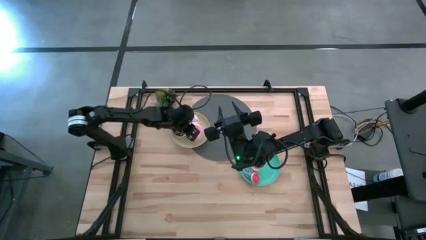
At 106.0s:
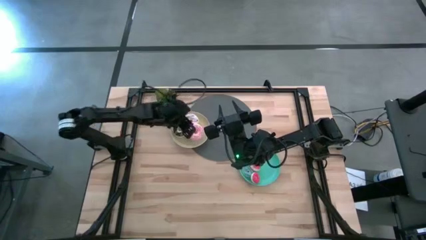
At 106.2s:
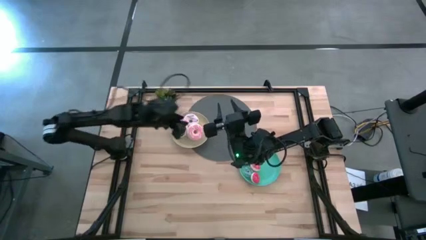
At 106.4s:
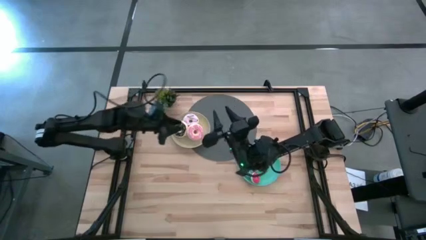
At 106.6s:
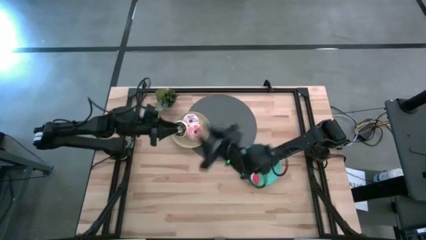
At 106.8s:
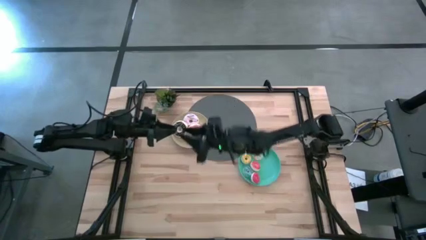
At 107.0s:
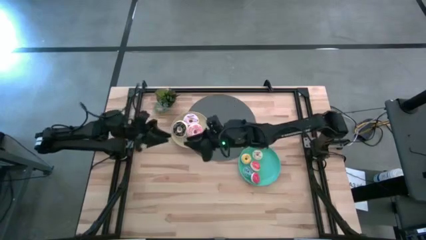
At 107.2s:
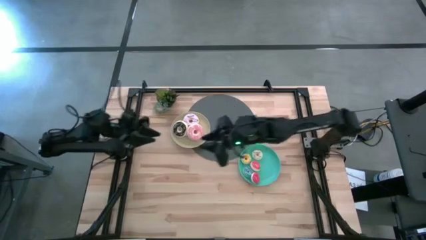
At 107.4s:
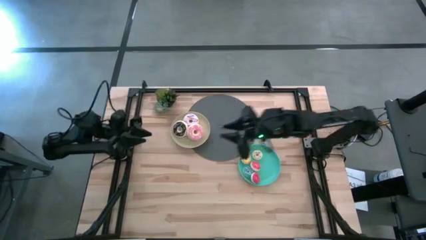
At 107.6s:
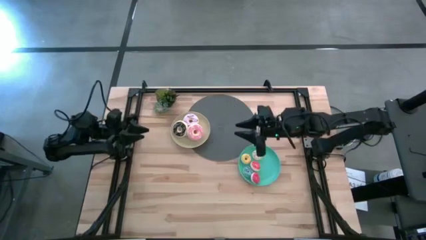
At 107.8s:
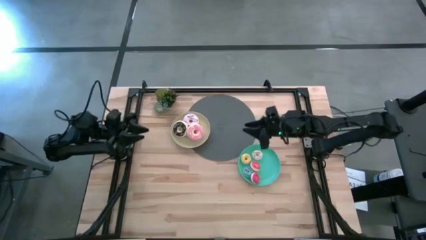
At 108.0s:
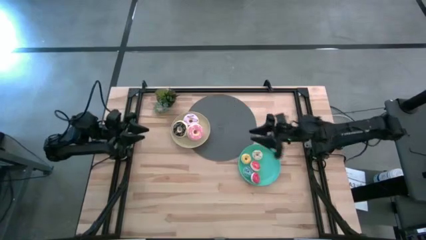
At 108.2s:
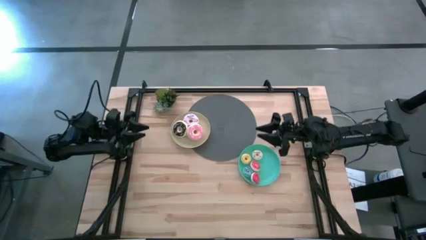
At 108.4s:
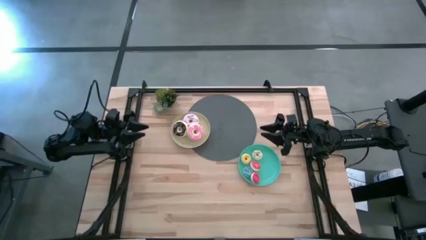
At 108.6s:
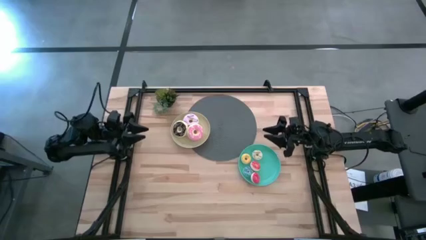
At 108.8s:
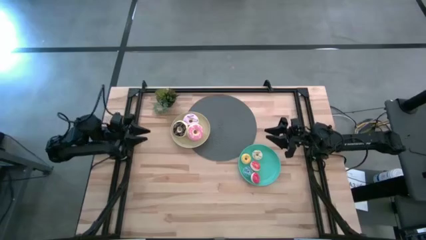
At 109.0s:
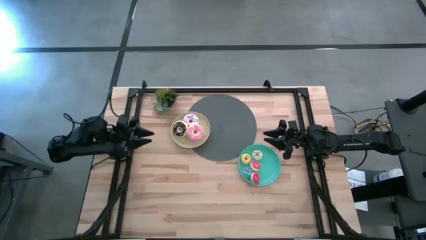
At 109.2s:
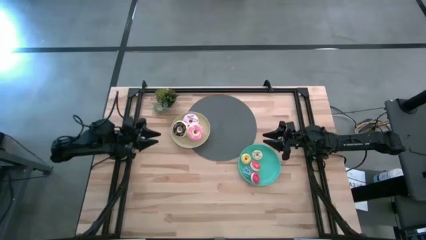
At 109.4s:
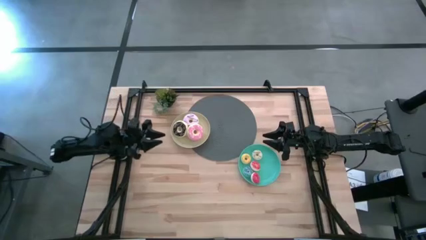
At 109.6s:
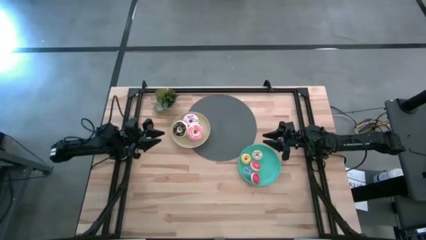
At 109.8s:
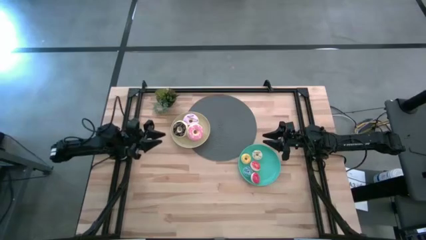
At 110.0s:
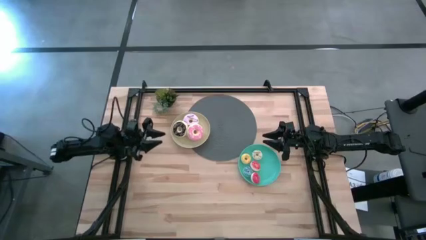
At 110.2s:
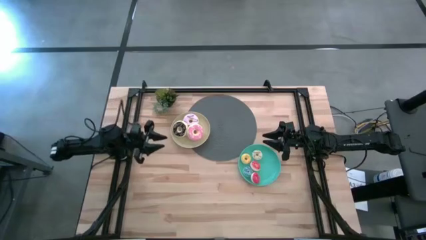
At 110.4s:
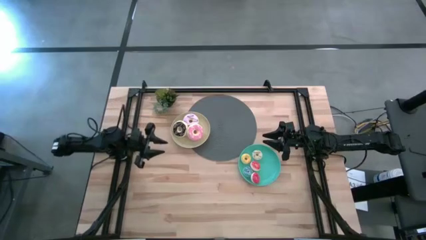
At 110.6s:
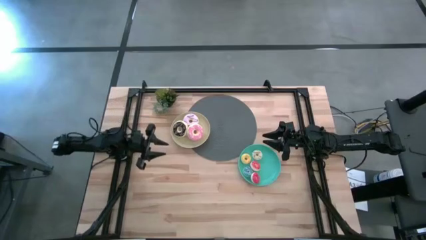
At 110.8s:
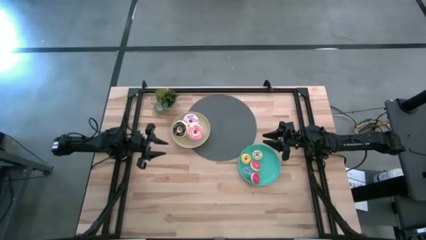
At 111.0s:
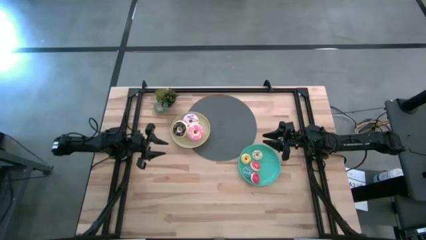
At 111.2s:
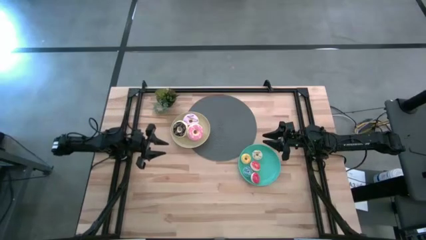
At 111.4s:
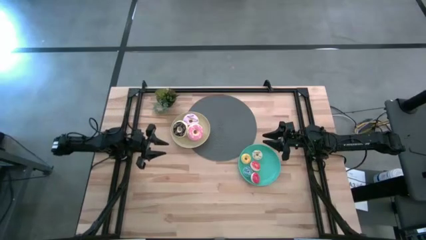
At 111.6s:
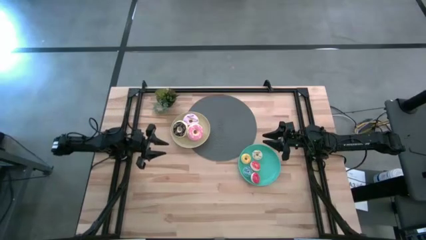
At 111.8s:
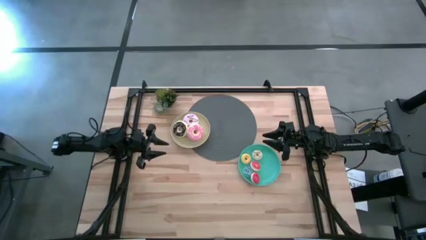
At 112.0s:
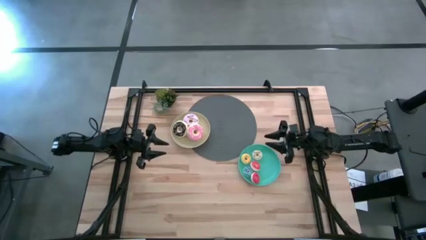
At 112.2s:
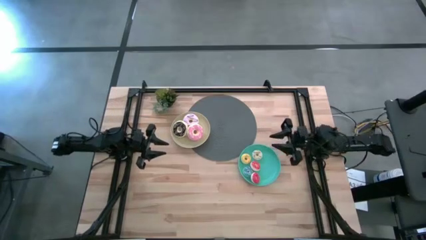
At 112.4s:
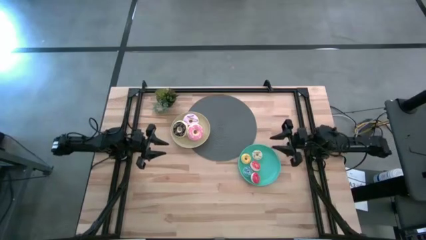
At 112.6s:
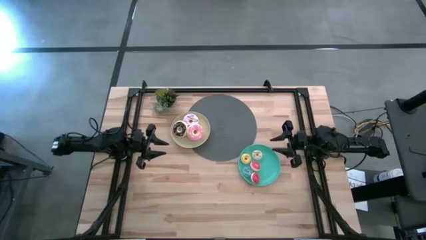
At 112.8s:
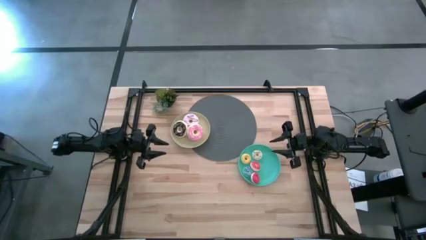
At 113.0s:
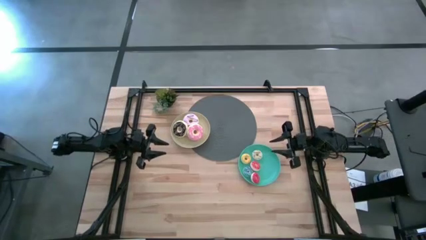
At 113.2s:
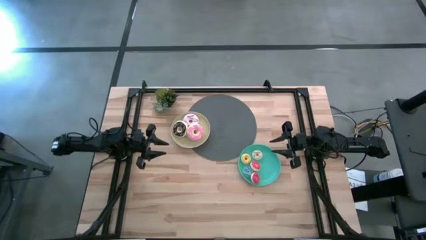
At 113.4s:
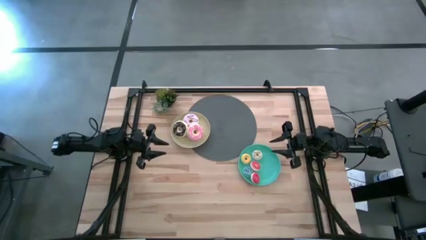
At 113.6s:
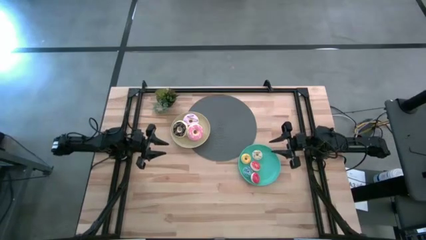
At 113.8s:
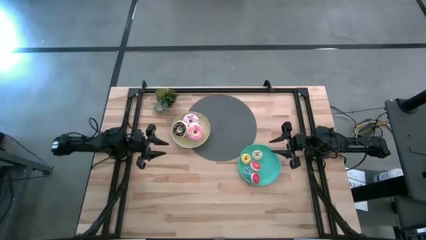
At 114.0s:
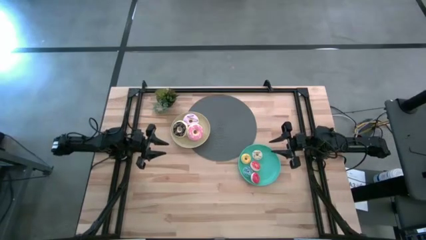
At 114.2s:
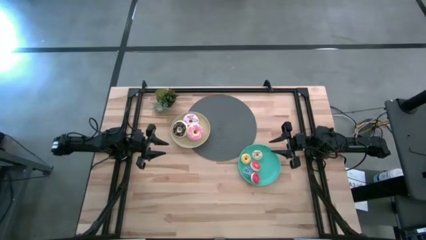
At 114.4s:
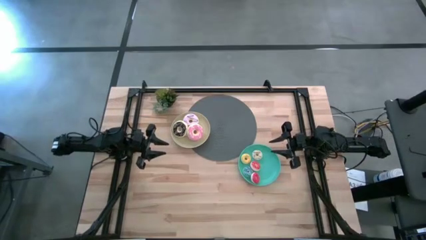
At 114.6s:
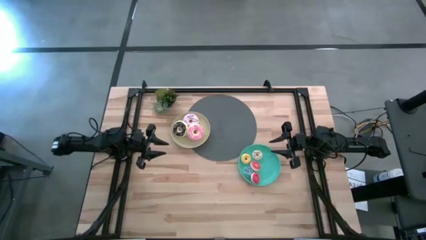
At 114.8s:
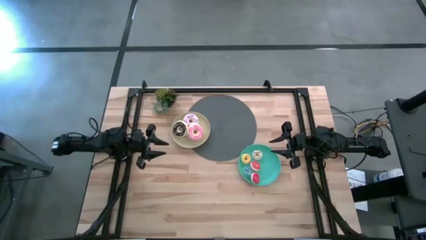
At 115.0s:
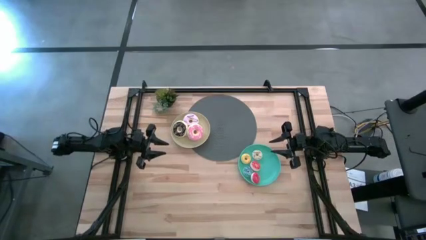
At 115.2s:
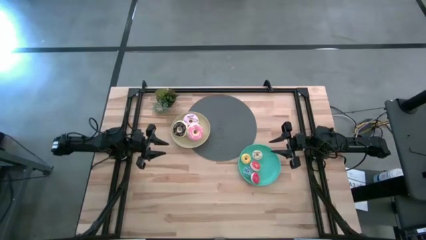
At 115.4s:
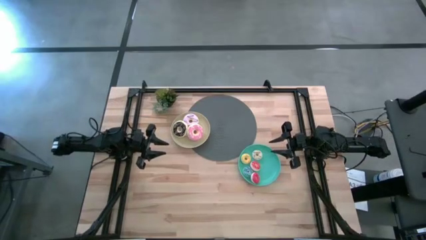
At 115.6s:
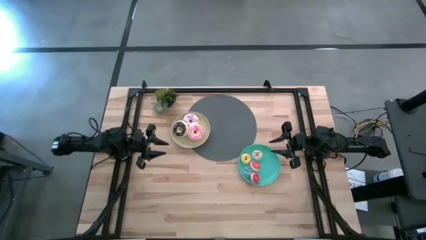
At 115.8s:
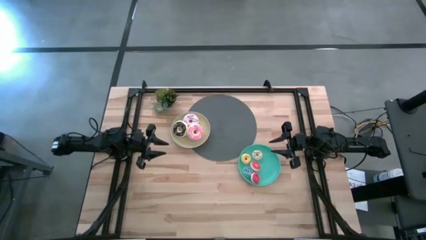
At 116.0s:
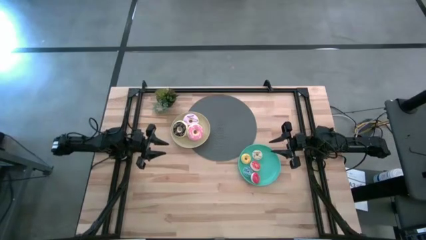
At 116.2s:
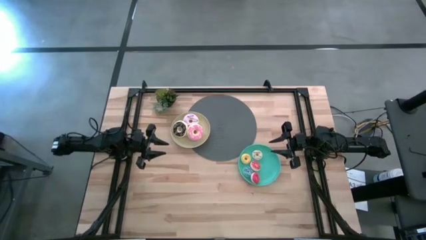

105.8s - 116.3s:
Task: Pick & Place donuts
Return to Home Position
